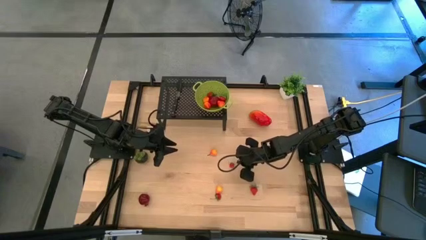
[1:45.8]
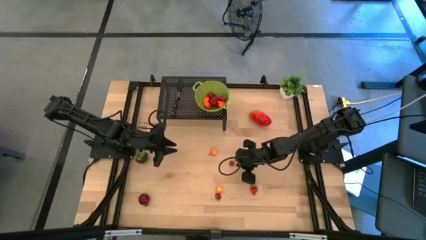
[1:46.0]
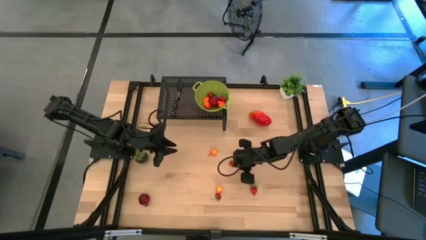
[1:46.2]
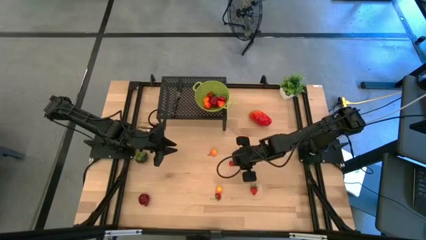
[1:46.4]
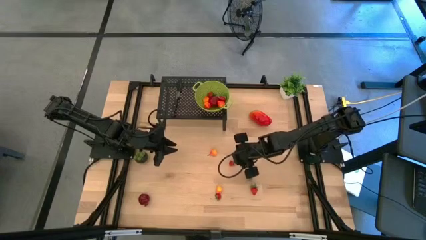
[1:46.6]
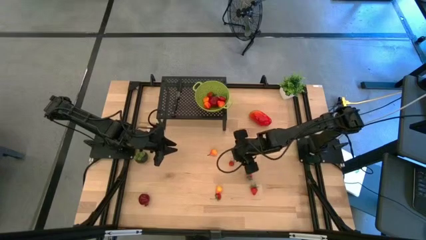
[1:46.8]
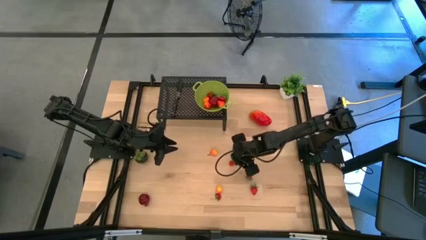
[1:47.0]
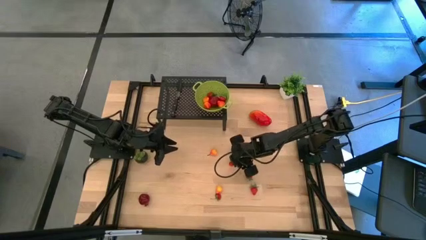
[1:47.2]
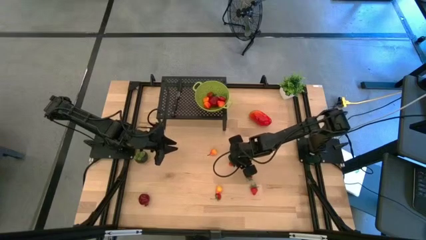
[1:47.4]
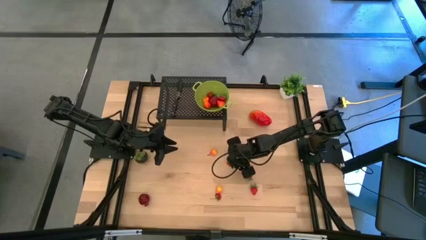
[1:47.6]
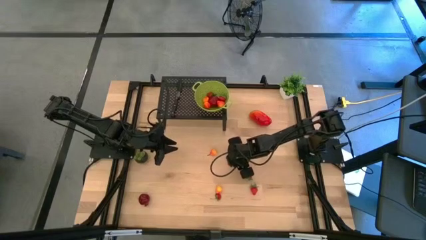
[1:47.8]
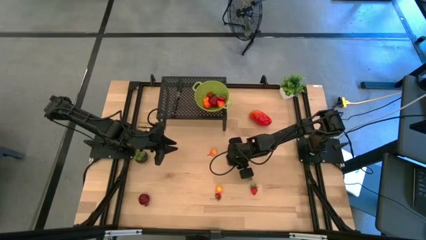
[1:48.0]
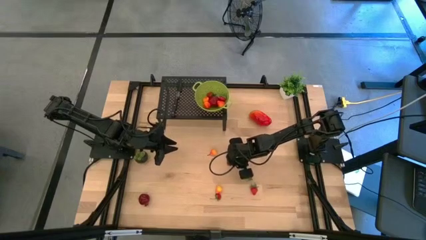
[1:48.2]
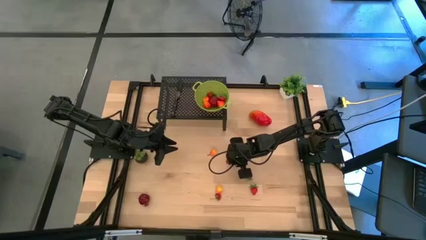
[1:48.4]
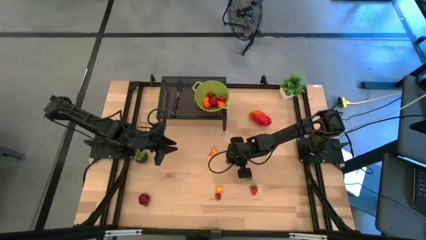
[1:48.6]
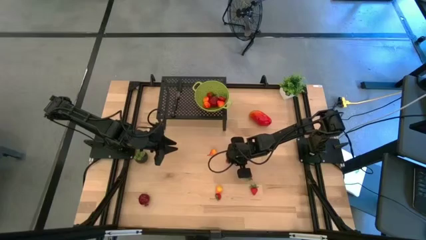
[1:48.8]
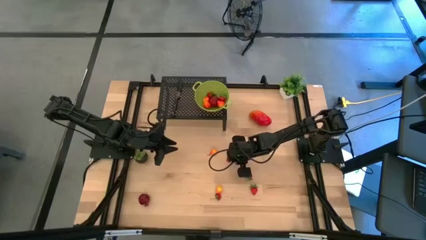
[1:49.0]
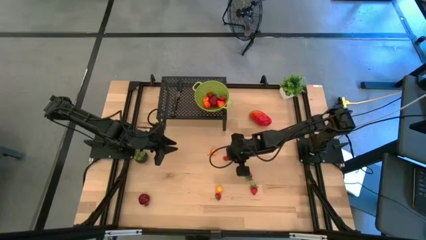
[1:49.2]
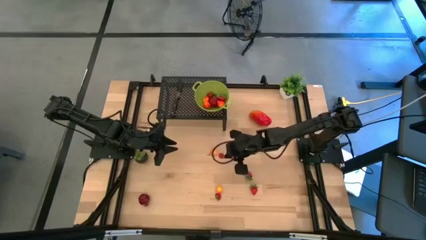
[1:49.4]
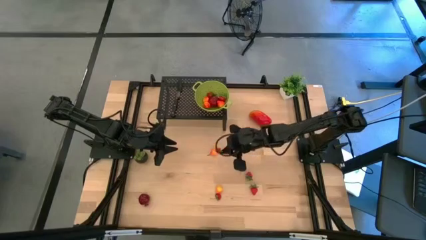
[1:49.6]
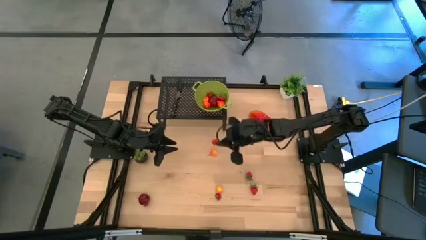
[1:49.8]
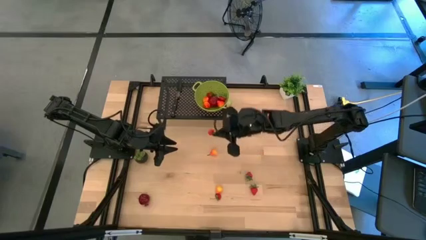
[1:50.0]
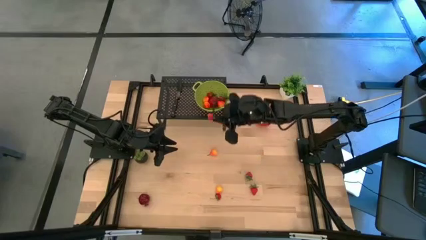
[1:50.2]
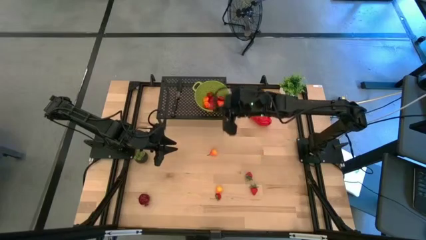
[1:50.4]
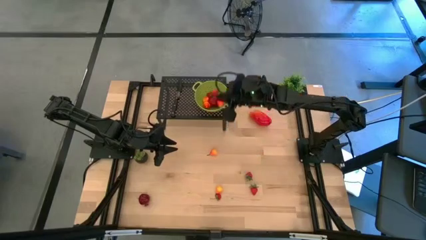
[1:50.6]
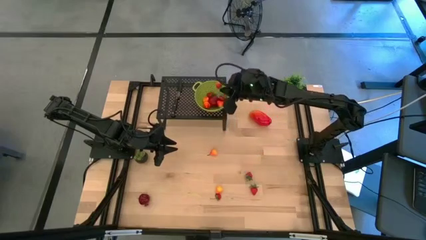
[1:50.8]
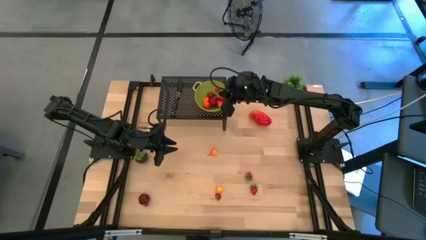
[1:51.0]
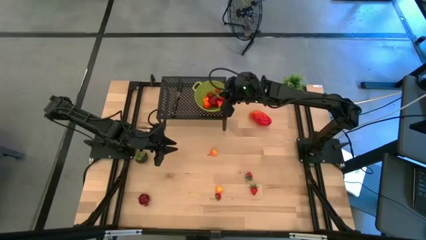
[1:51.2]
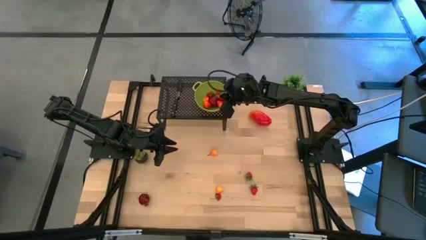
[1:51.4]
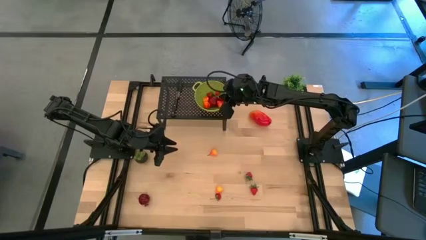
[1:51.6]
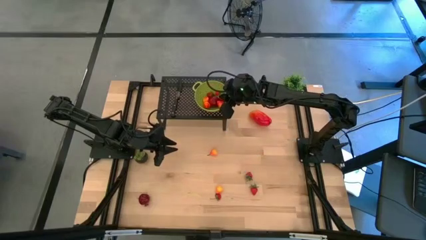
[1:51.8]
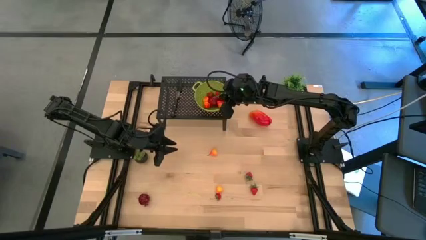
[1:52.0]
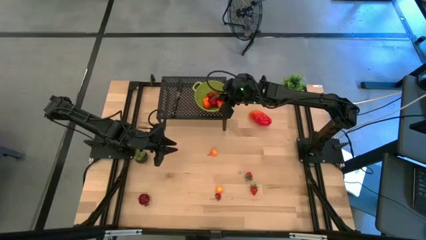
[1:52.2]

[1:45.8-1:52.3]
Task: Pick & Place Fruit
Put the strawberry into the green strainer bowl on the shelf

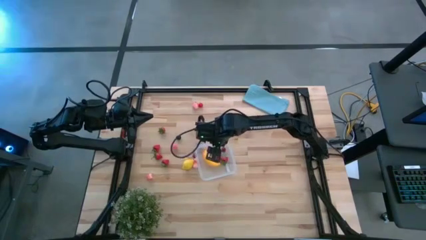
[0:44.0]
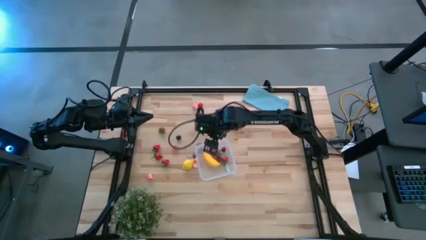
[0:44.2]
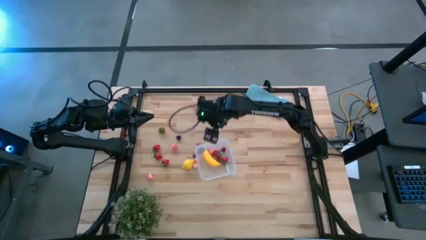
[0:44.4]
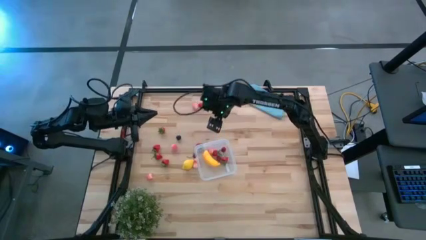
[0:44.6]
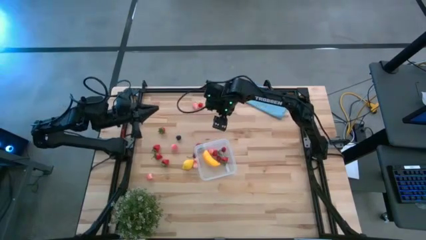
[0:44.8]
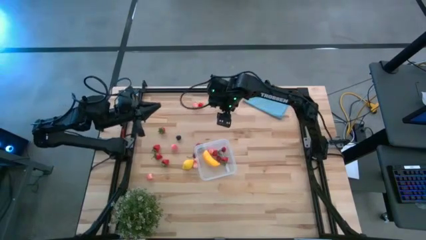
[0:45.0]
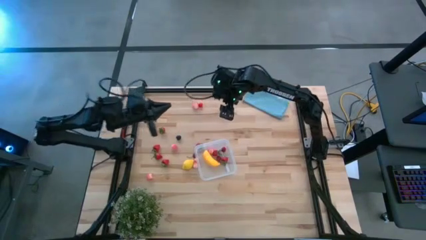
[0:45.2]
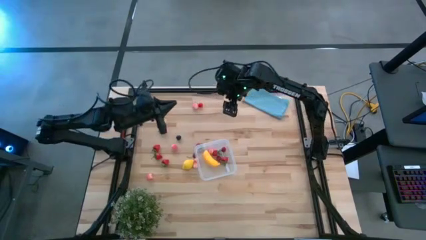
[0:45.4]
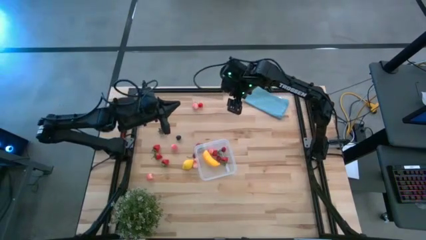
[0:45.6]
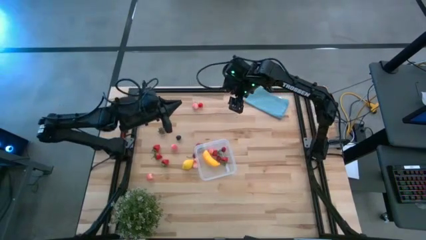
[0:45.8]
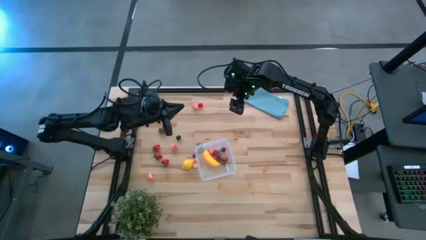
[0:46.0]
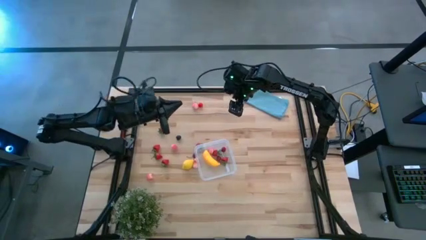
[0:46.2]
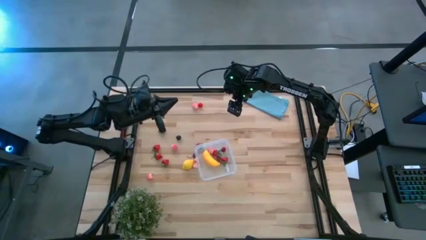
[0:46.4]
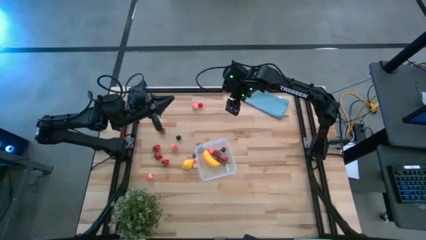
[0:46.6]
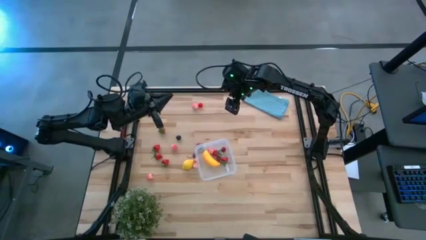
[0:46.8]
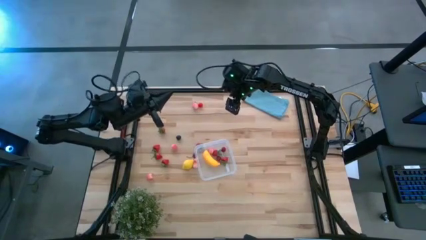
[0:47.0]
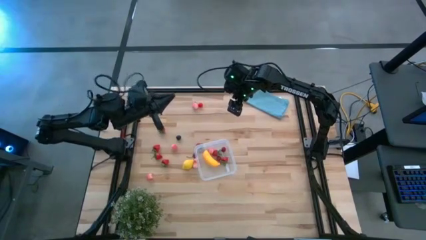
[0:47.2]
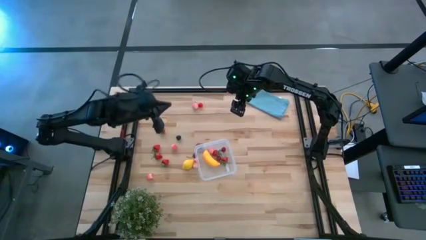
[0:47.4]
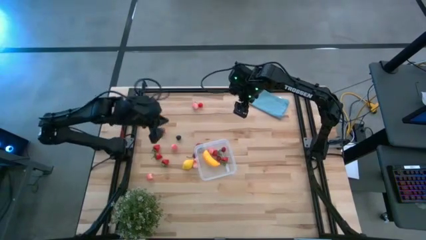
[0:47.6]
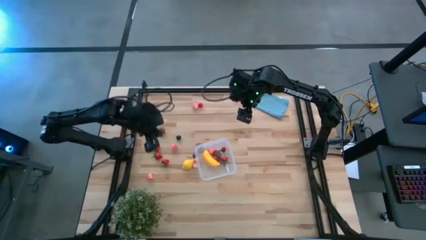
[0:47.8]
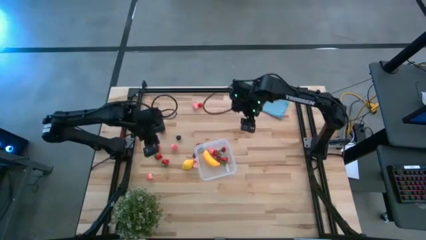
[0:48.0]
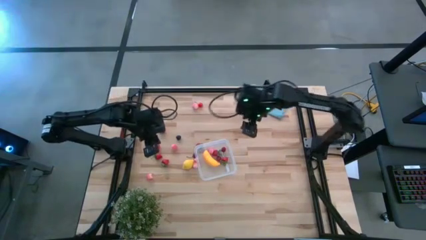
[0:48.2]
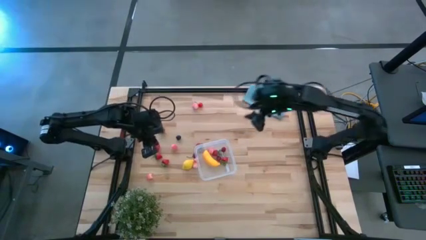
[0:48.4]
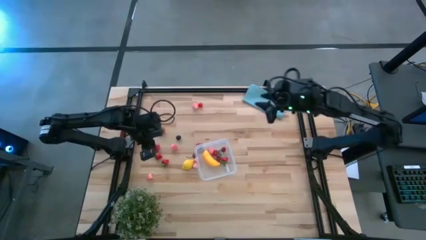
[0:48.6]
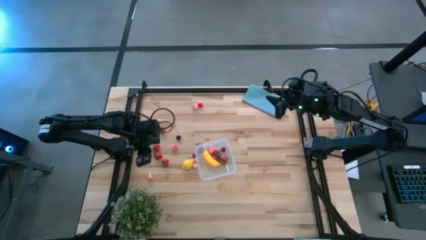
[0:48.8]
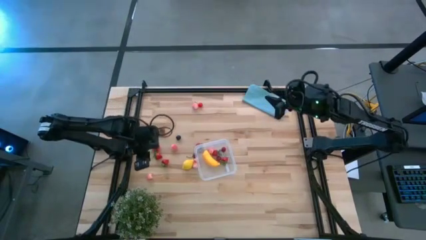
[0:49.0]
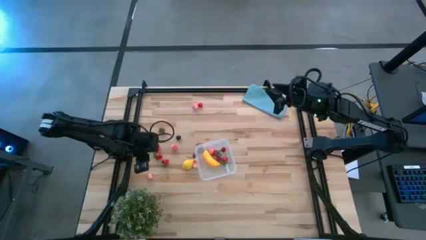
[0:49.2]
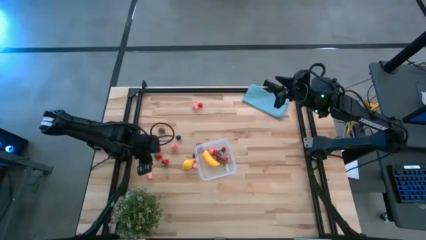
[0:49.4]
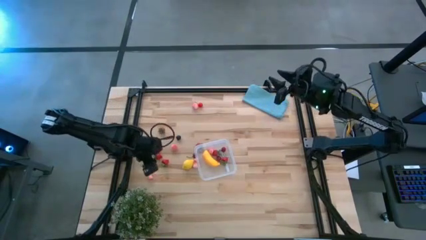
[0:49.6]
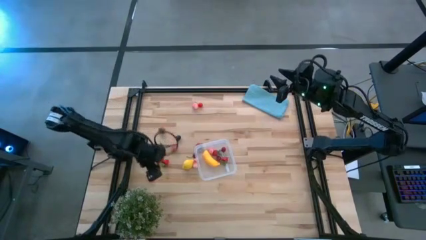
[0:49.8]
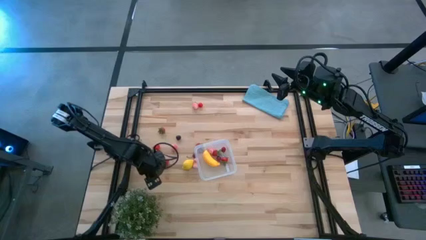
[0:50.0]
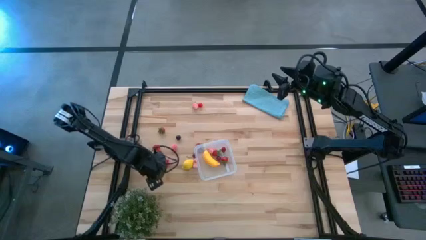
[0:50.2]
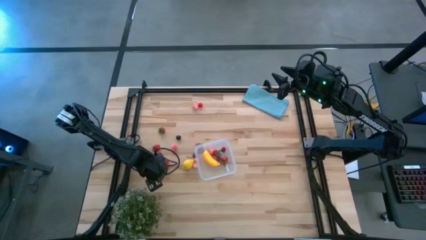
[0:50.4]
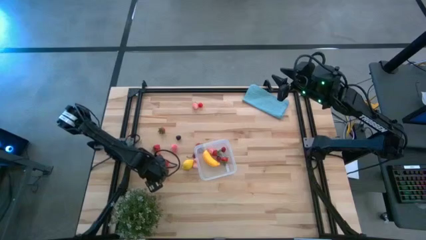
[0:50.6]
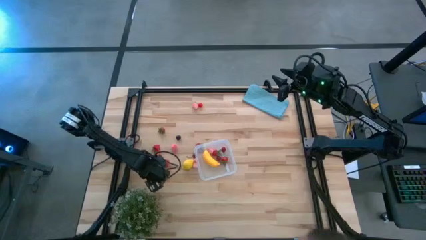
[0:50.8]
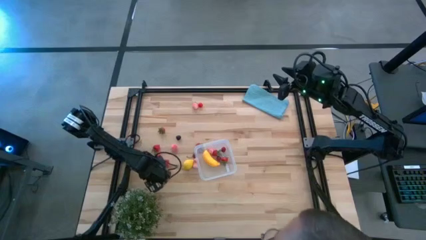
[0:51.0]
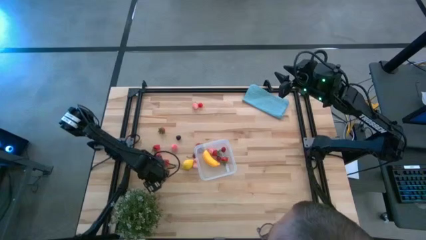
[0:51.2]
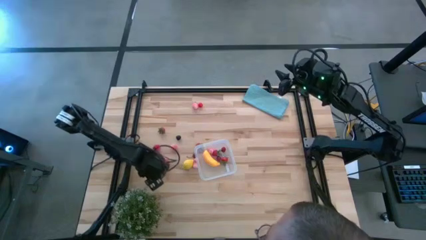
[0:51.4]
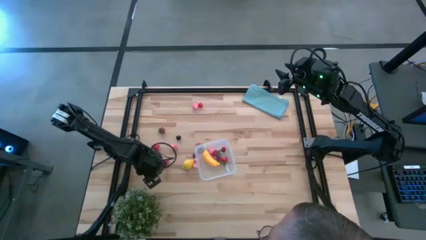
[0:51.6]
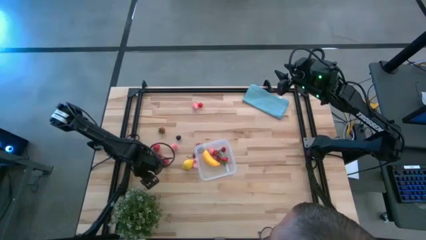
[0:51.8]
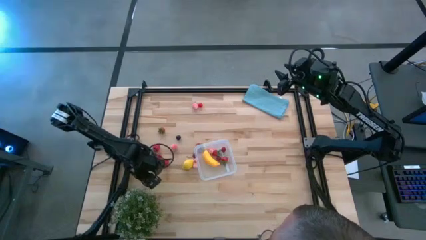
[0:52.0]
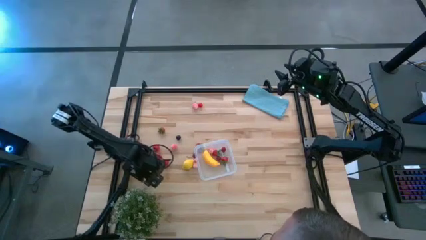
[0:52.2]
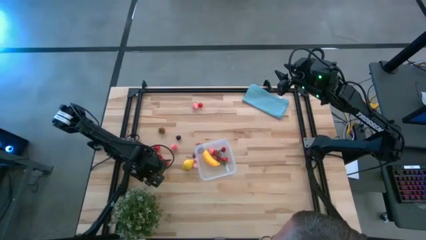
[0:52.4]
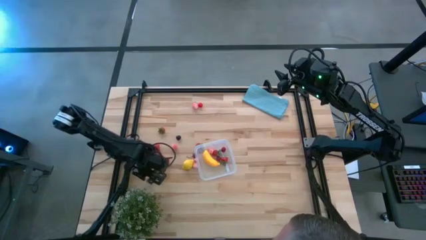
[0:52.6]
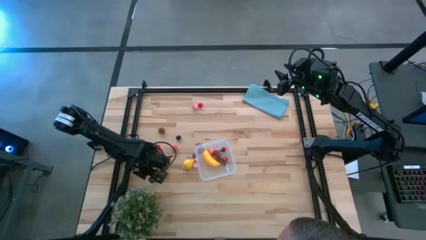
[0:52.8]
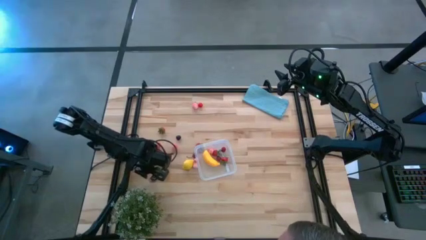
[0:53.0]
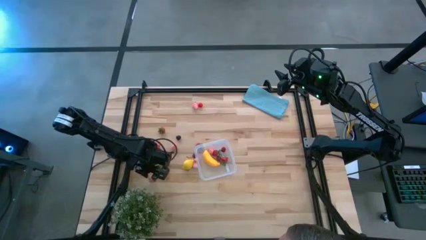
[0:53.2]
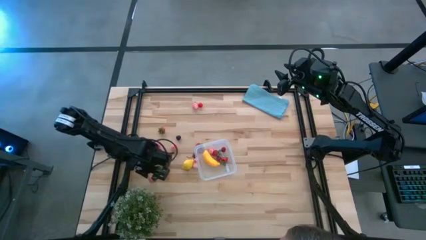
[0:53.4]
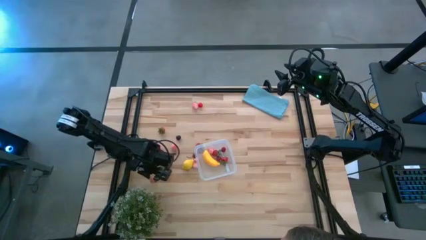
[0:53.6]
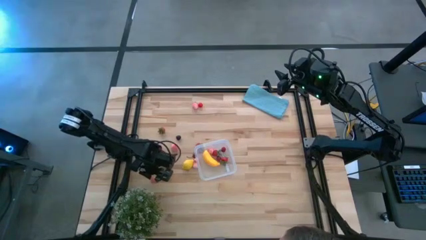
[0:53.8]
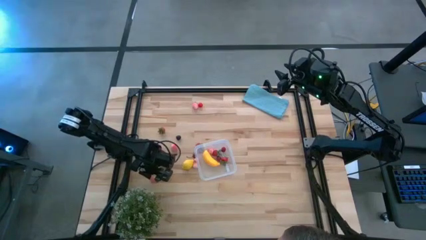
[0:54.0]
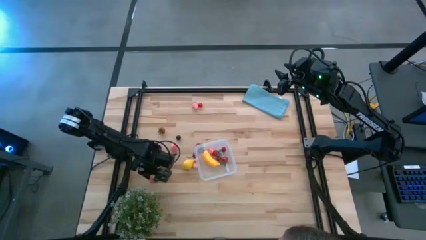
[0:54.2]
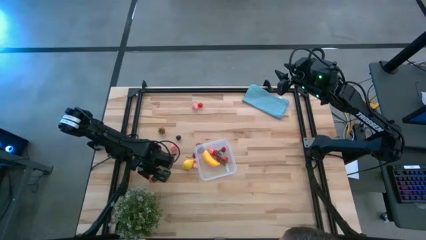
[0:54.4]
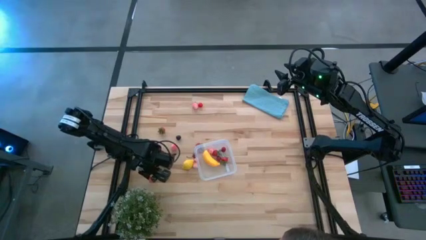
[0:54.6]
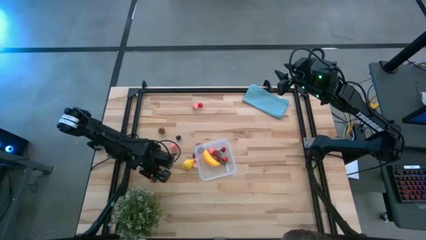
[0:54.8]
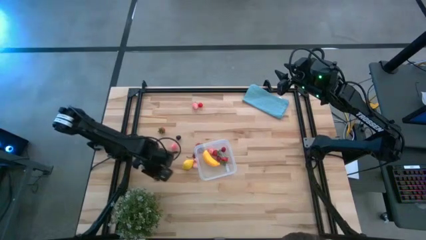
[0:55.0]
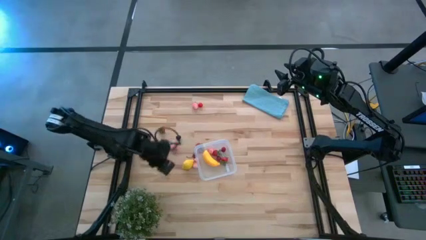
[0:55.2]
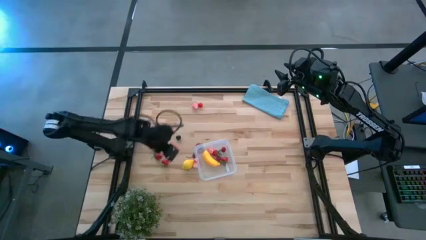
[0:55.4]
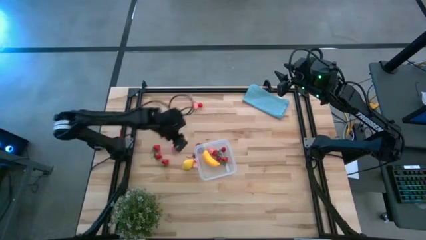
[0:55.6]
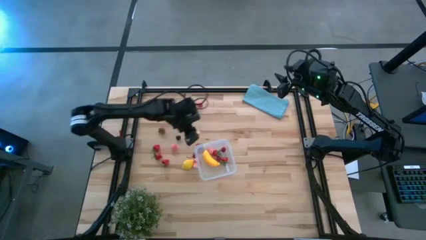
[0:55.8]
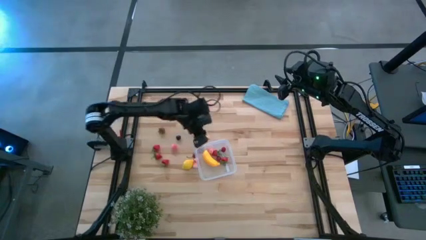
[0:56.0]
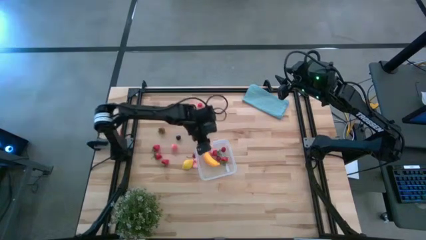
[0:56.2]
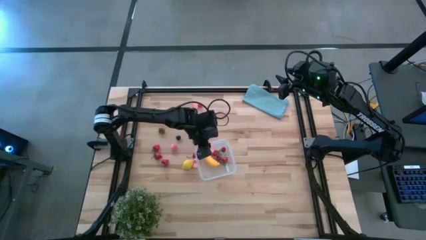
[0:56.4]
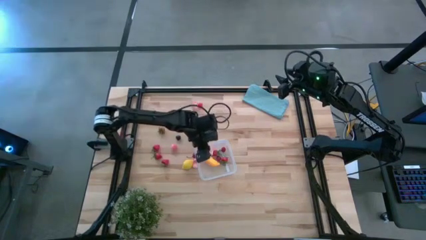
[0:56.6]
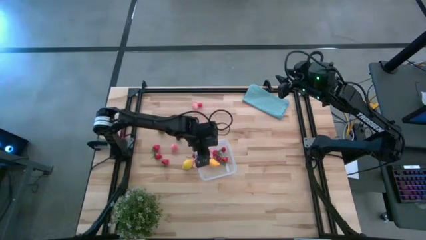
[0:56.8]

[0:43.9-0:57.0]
Task: Pick and placing Produce into tupperware
Put the pink peach into the transparent bin
